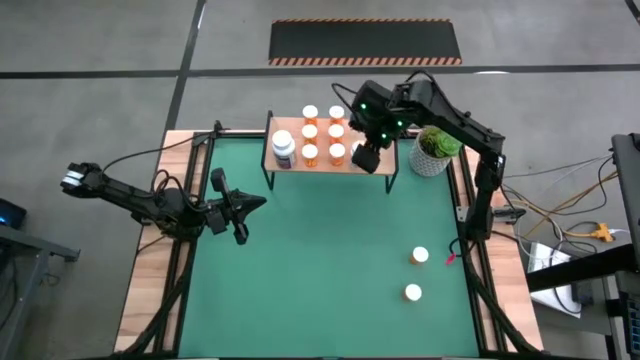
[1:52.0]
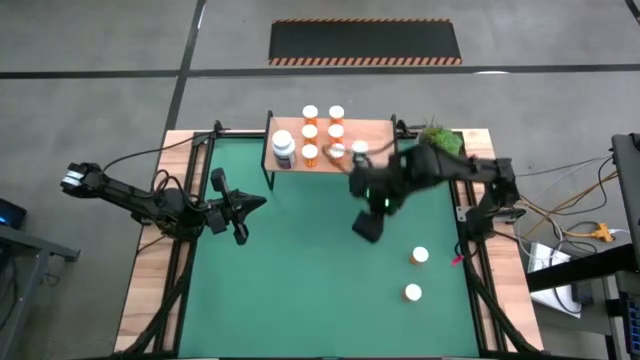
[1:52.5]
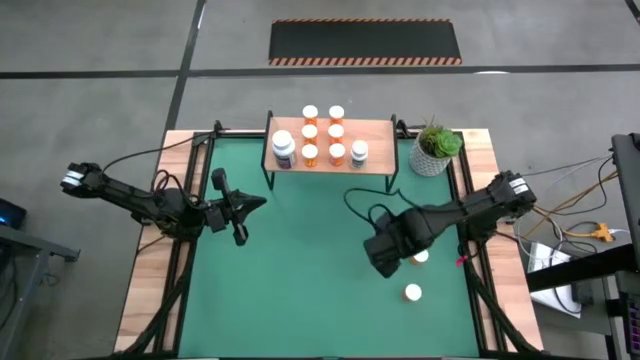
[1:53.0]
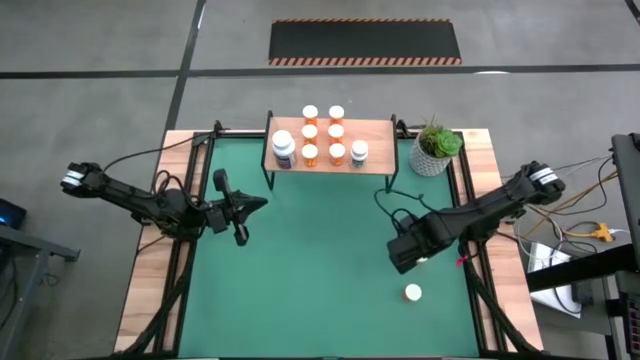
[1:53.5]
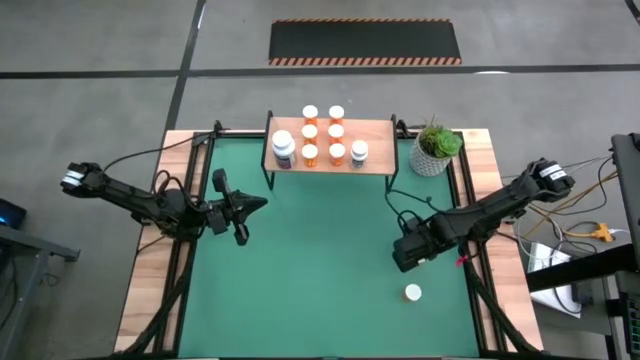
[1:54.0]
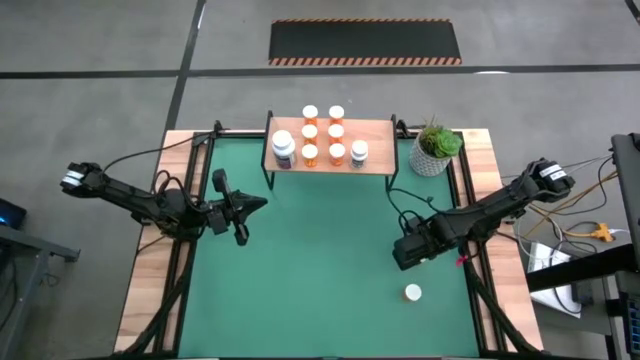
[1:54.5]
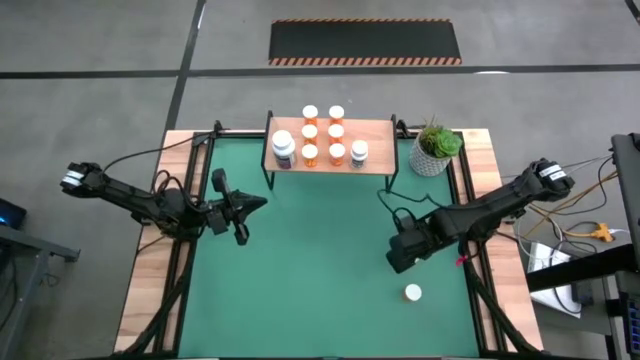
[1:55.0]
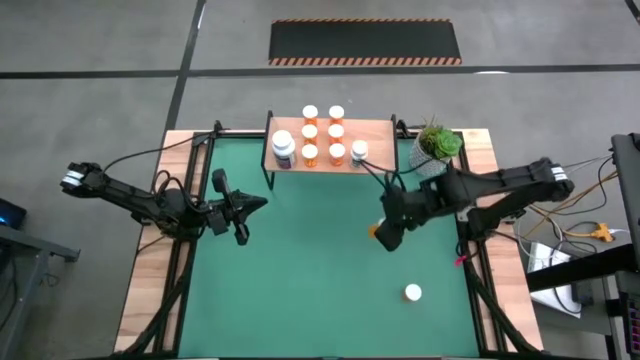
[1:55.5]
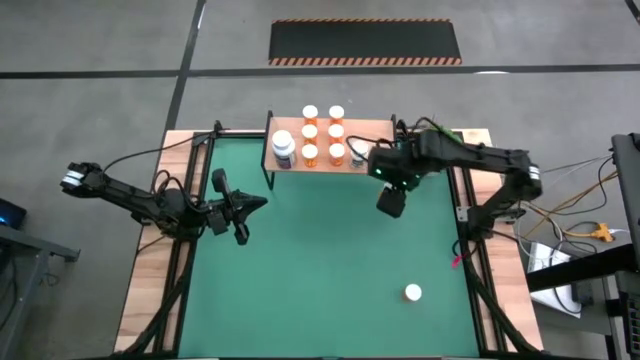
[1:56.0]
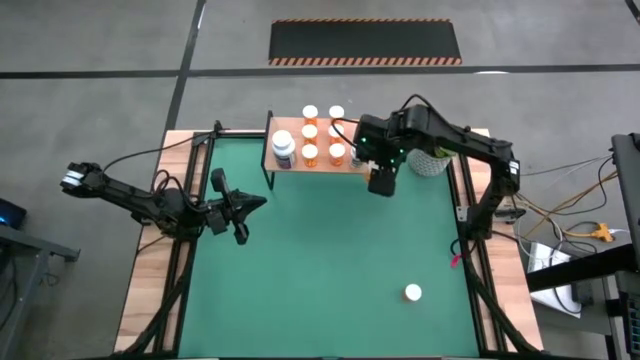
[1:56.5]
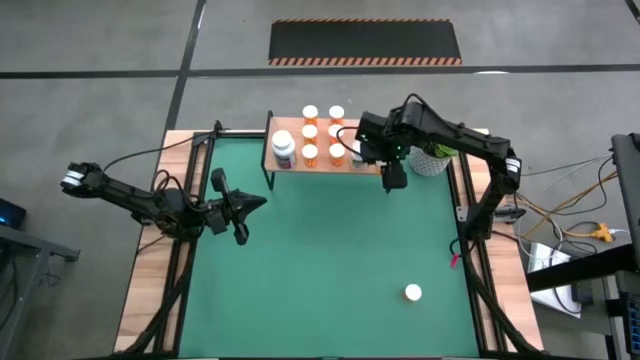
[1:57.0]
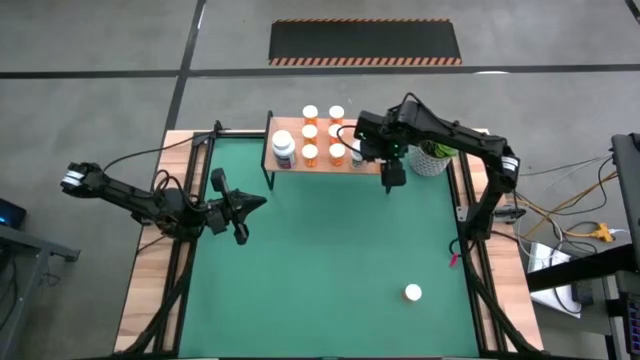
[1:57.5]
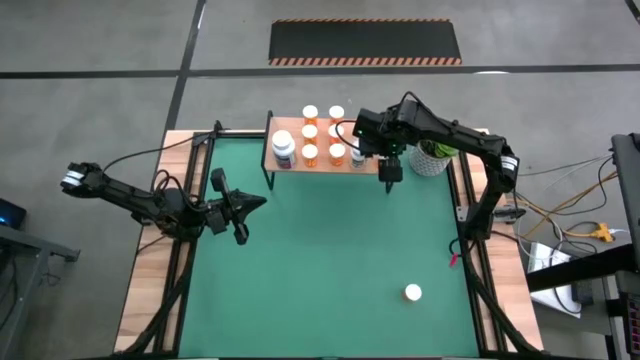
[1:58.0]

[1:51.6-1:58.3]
Task: Pick and place medicine bottles onto shelf by color
Put the orange pill bottle on the shelf

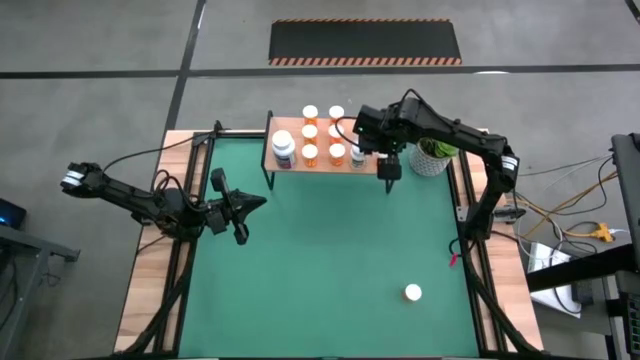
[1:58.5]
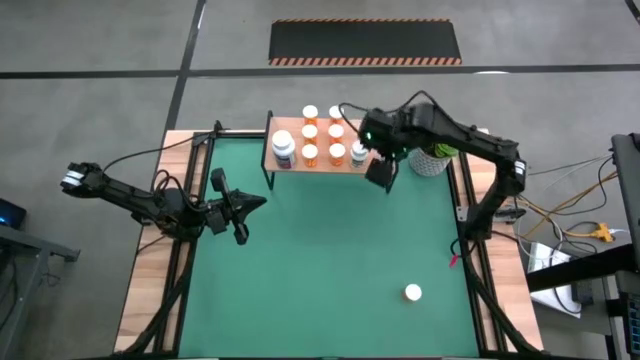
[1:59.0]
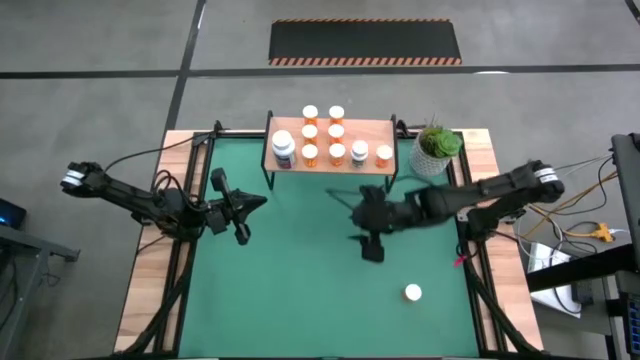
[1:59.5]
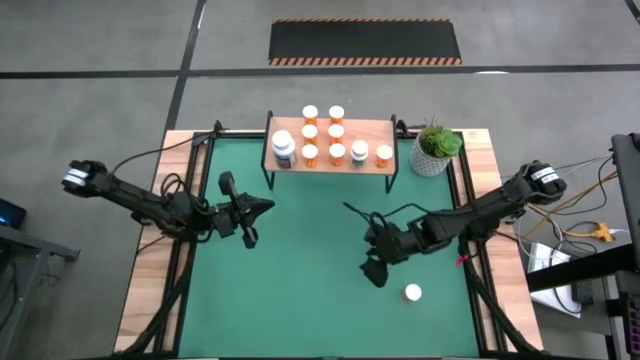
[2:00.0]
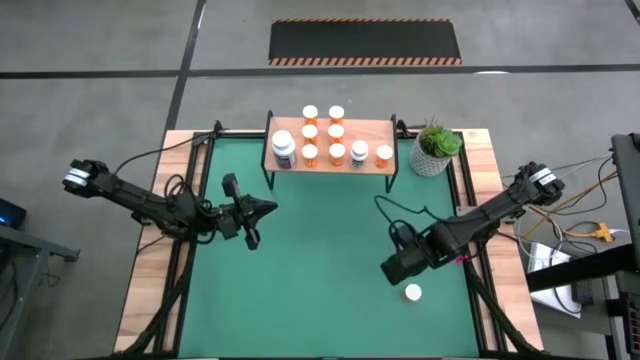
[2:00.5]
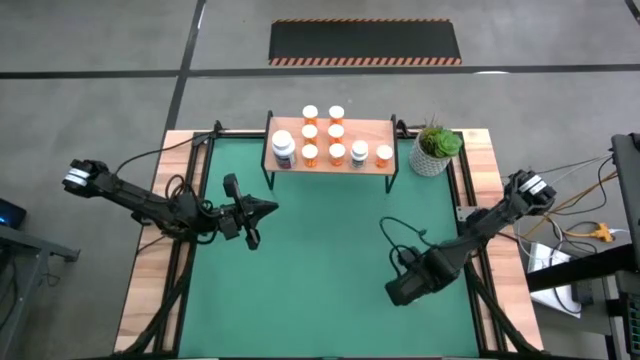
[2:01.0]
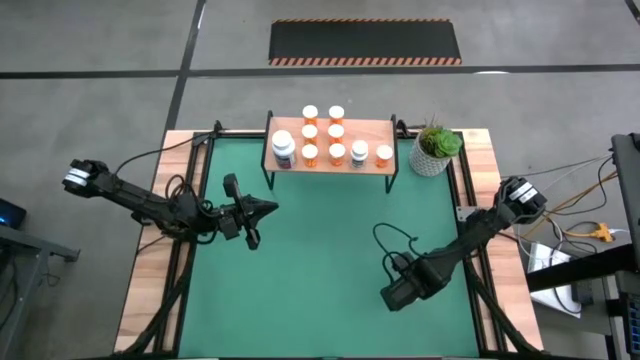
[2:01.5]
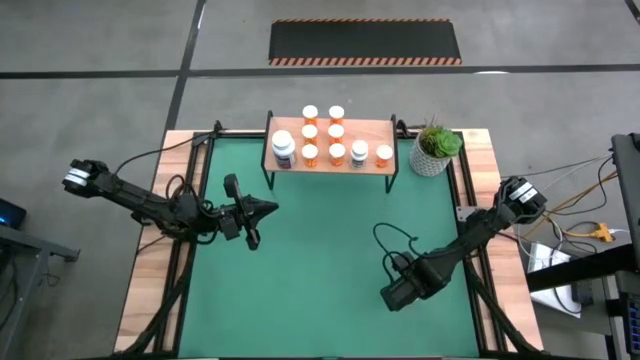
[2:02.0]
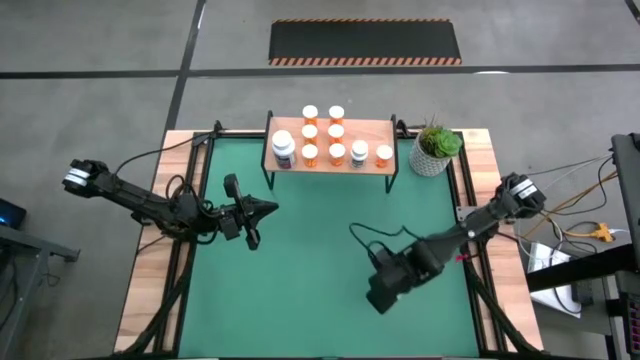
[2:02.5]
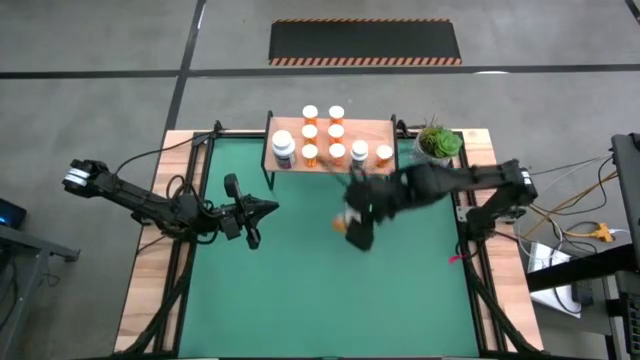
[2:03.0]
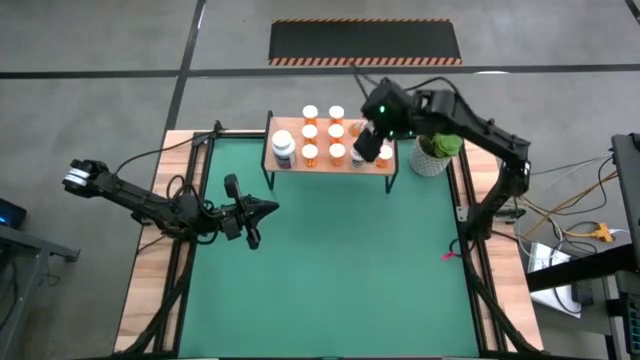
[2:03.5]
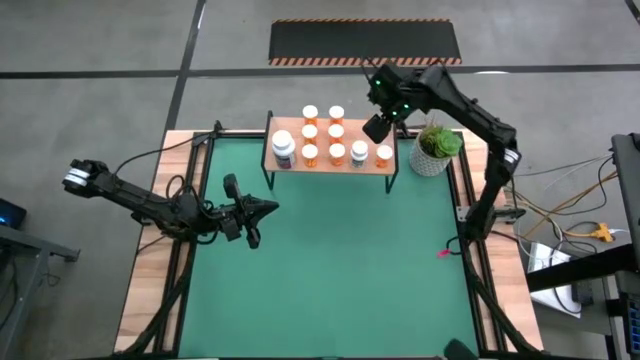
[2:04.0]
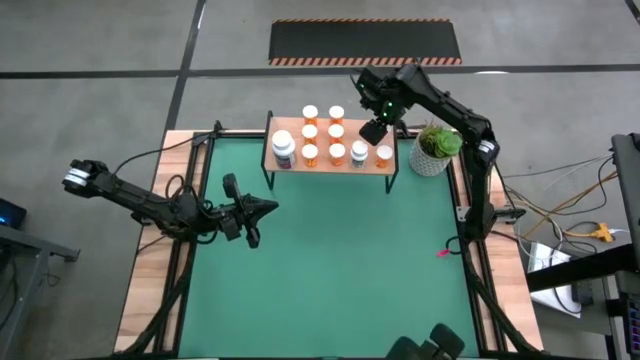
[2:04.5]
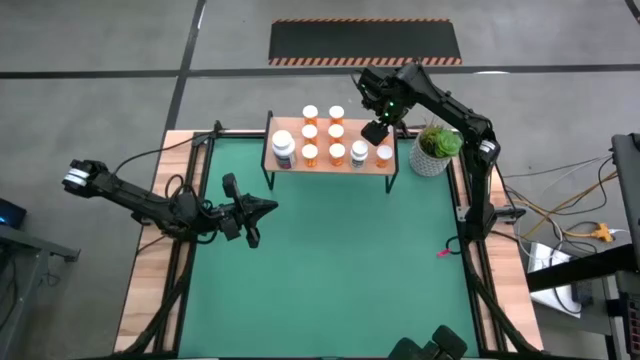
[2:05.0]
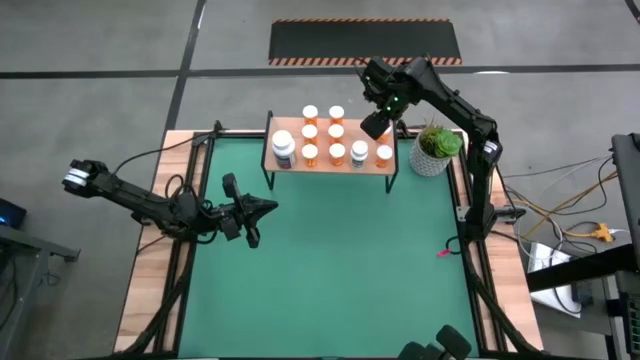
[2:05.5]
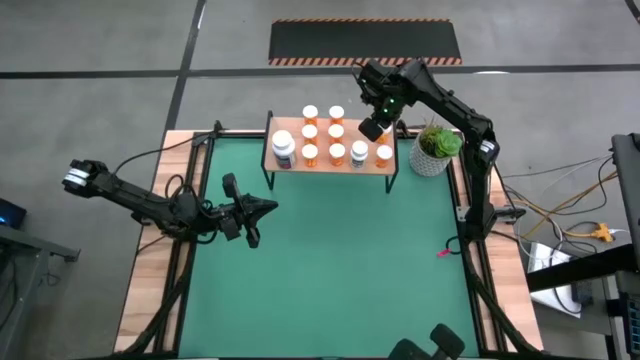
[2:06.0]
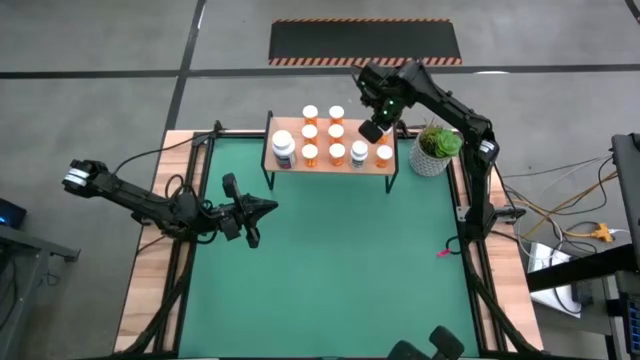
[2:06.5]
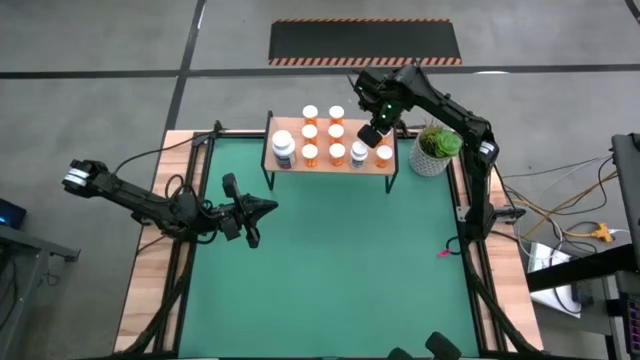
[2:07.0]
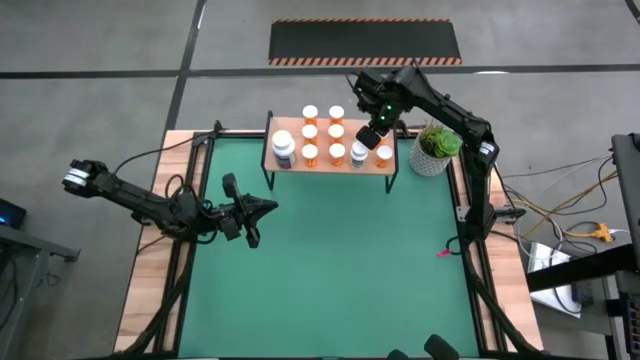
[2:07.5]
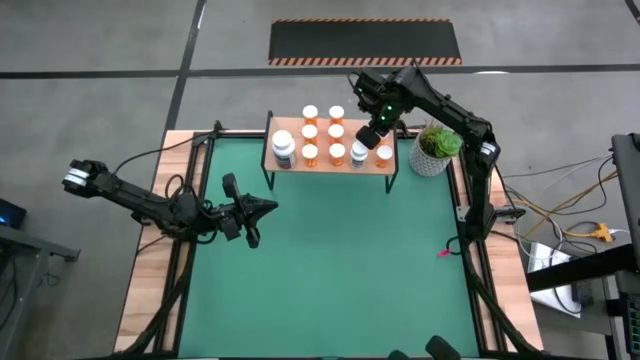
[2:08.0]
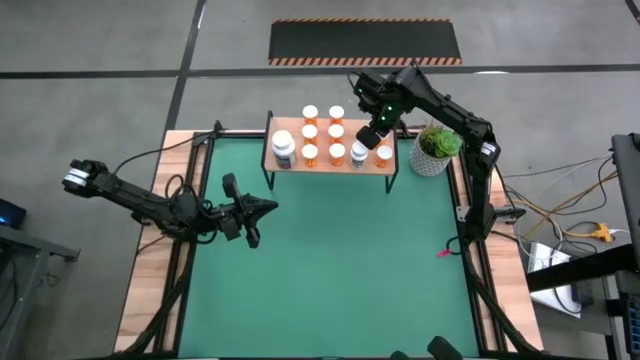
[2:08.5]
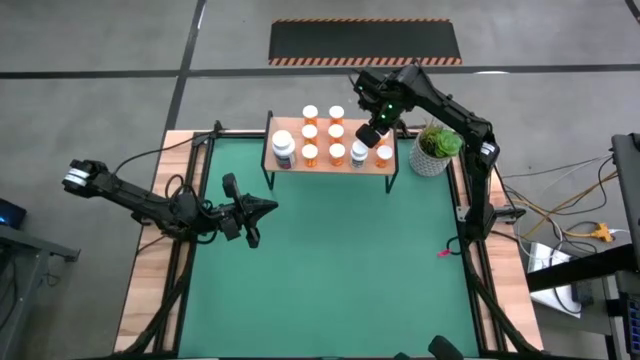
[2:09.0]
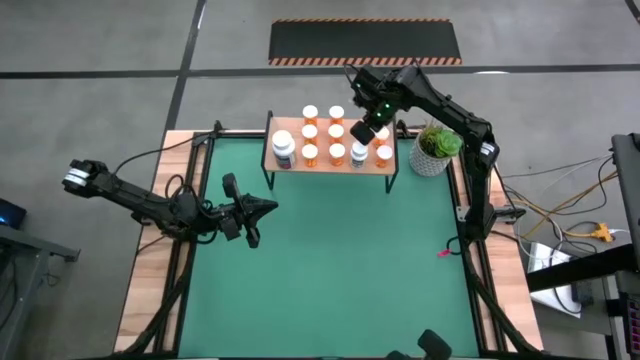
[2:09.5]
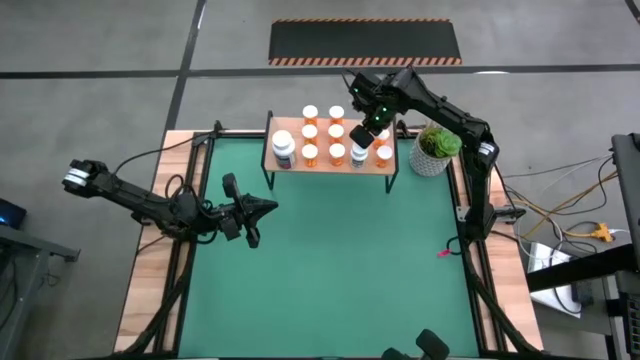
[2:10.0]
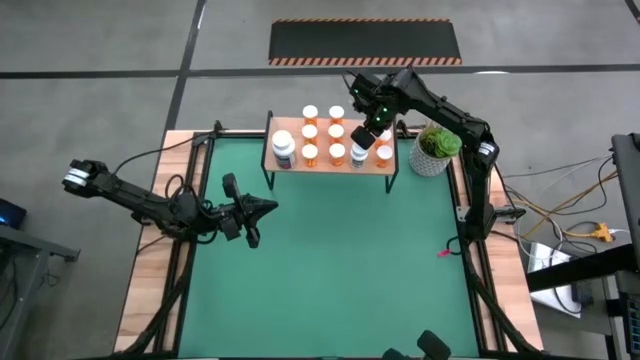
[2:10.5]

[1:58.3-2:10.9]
Put the orange pill bottle on the shelf aligned with the other orange pill bottle

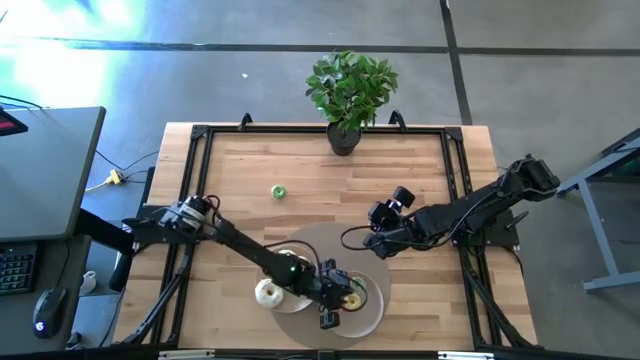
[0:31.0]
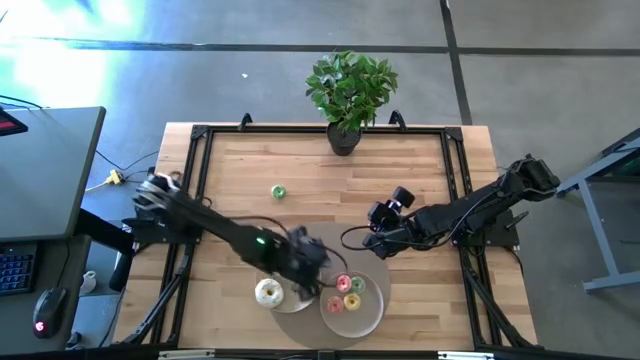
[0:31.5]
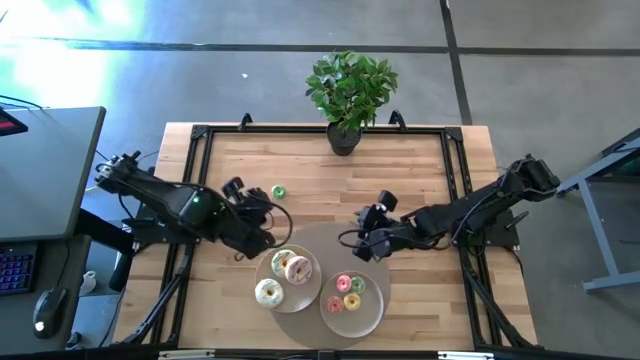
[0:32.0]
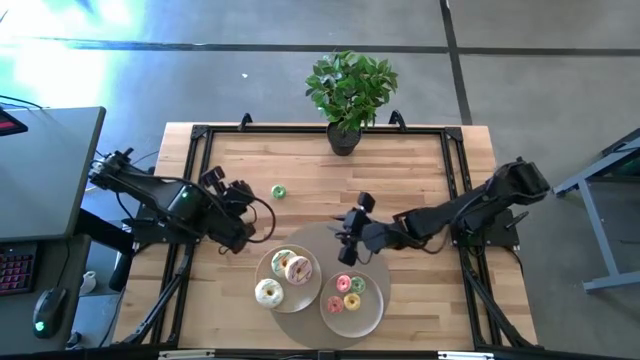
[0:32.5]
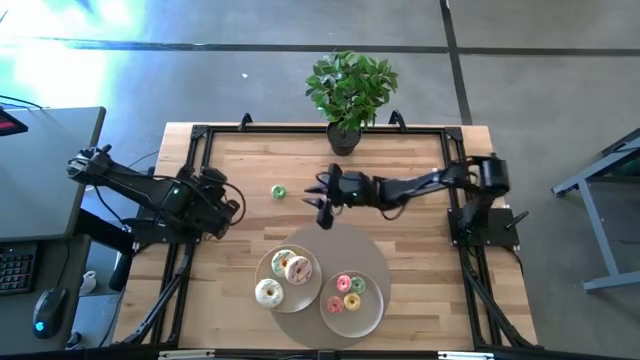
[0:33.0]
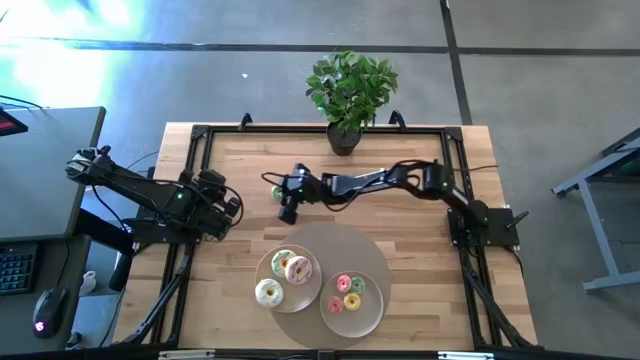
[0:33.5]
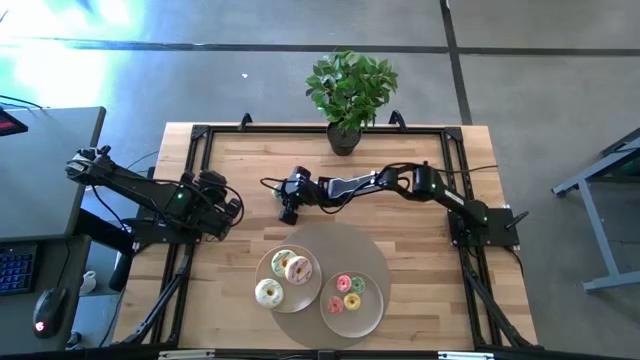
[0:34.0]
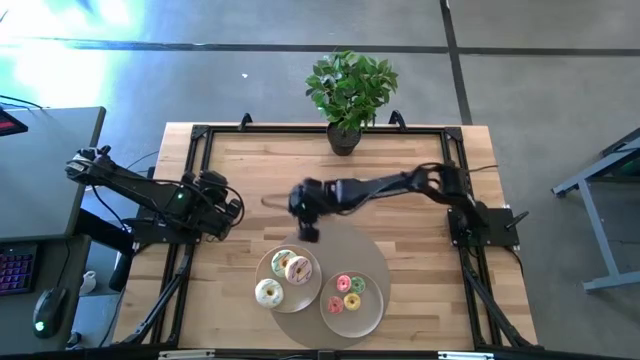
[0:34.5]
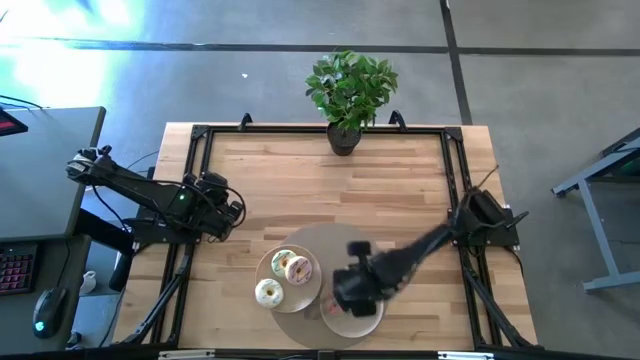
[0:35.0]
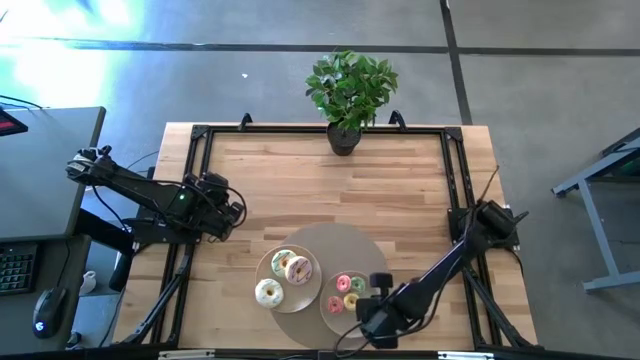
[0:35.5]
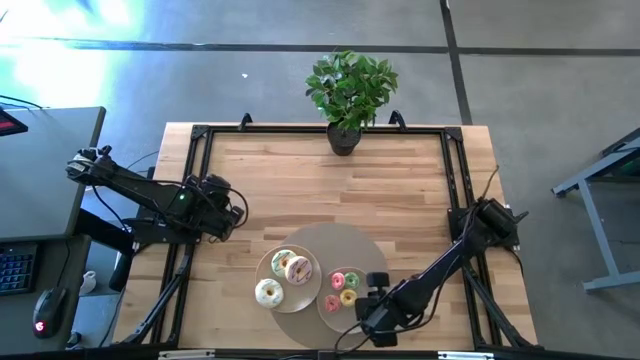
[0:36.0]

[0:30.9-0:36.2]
Task: Pick & Place donuts
Put the small green donut on the right white plate
